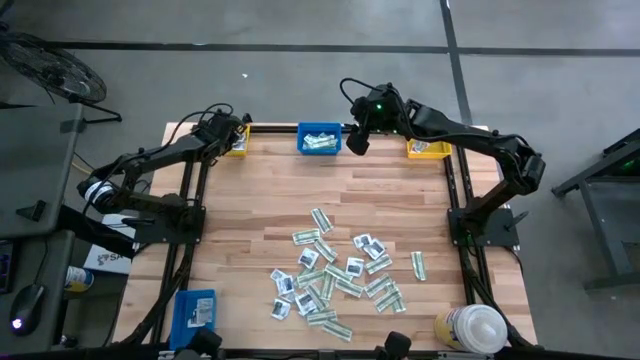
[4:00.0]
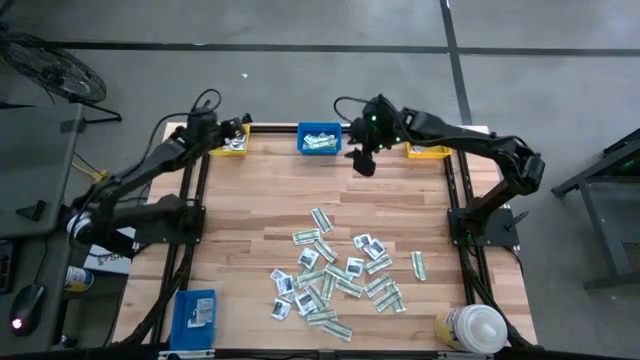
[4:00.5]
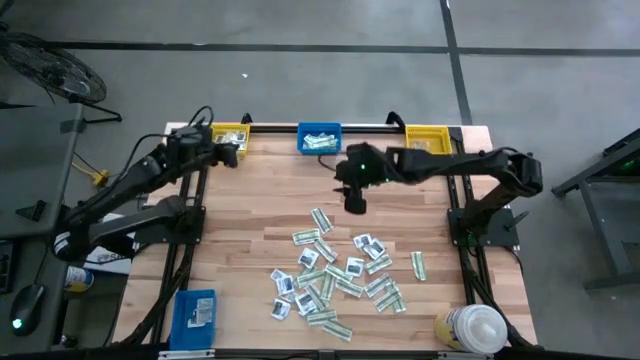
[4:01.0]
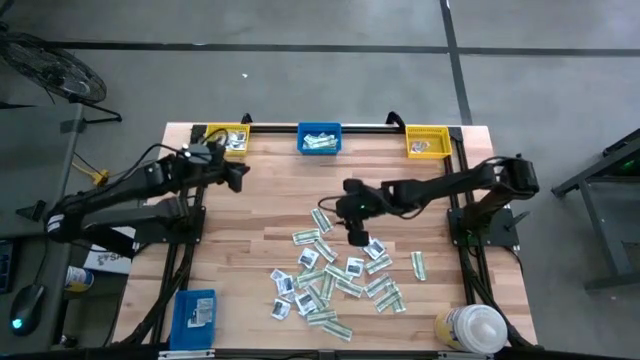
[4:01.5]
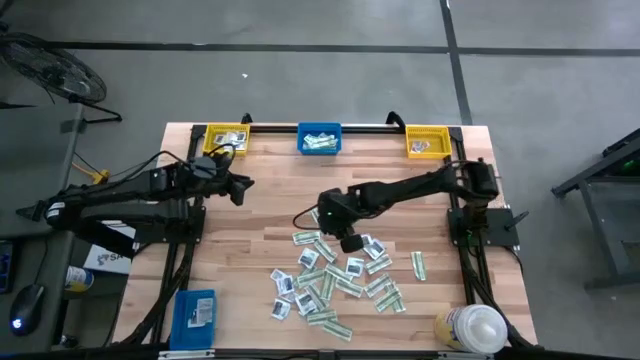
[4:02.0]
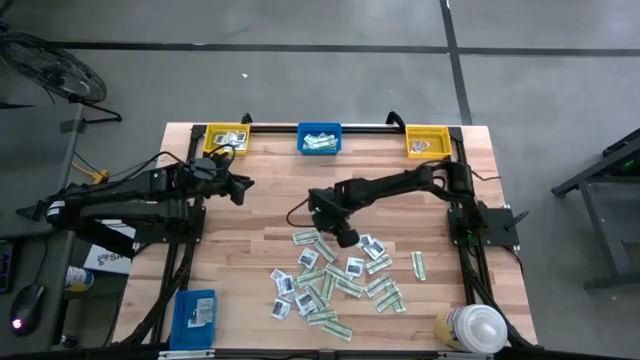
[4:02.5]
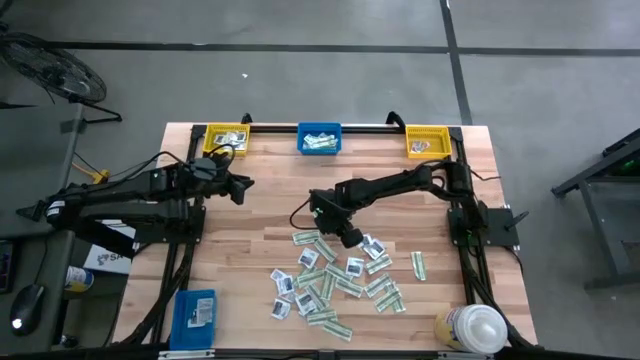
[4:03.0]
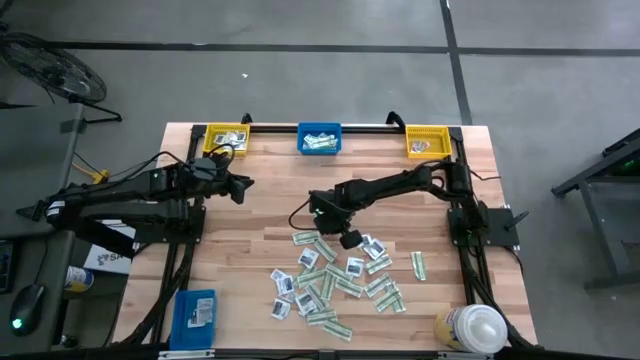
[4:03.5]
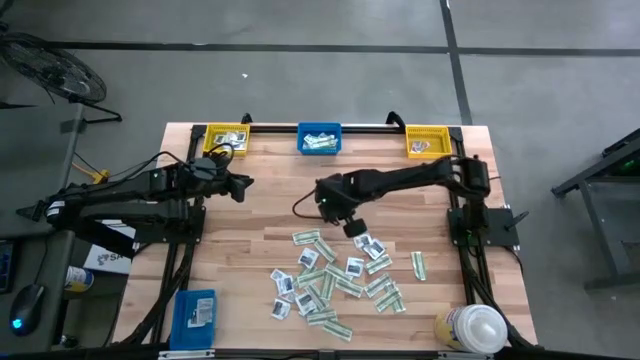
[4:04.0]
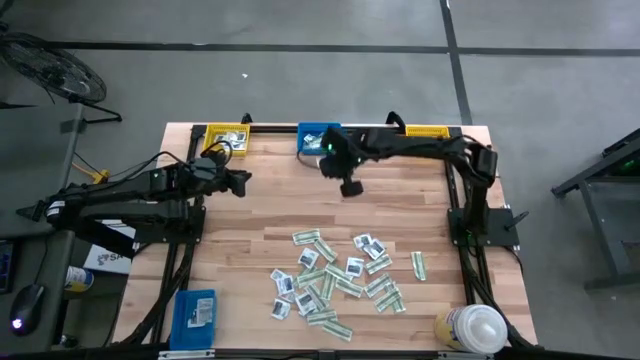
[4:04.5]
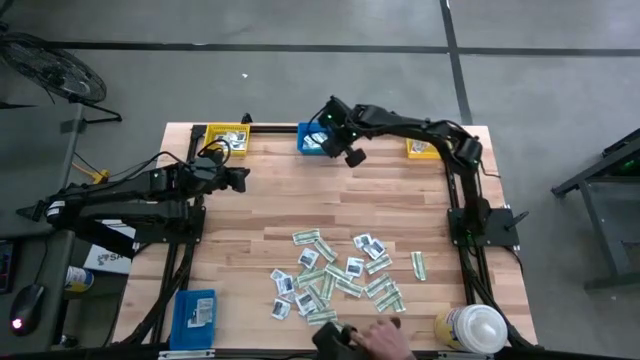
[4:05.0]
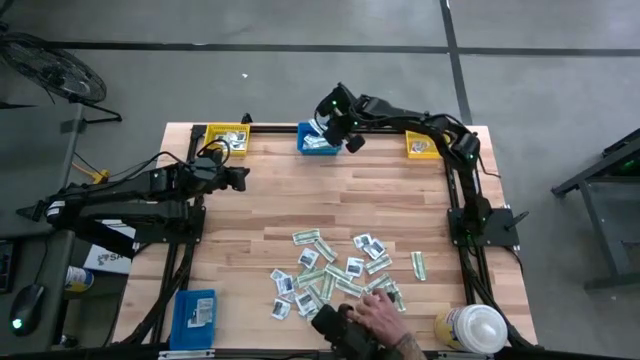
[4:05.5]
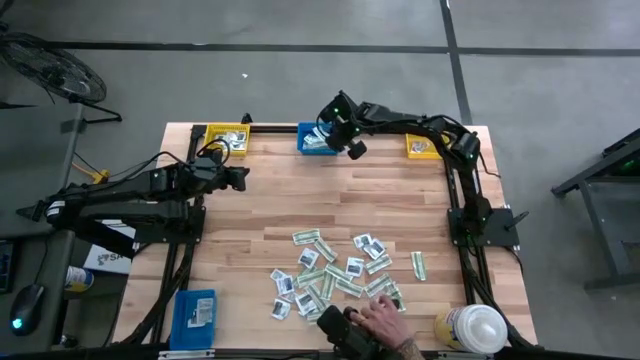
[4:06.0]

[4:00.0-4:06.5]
Task: Pick & Place First Aid Supplies
Put the green bandage pack into the top blue bin

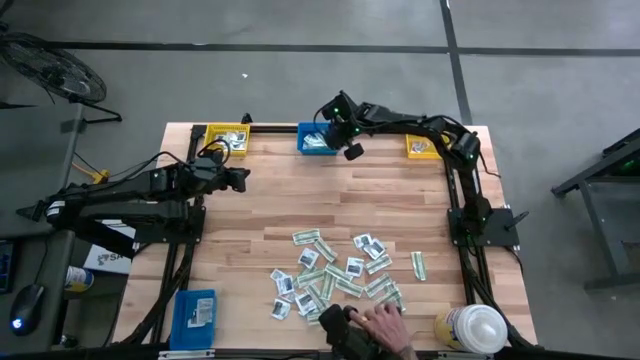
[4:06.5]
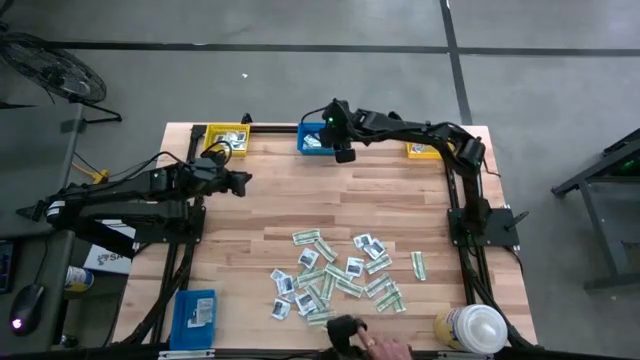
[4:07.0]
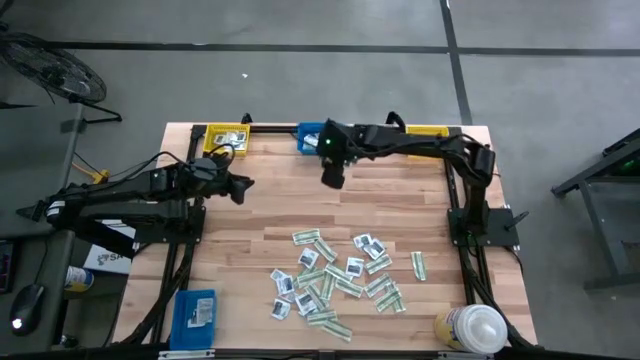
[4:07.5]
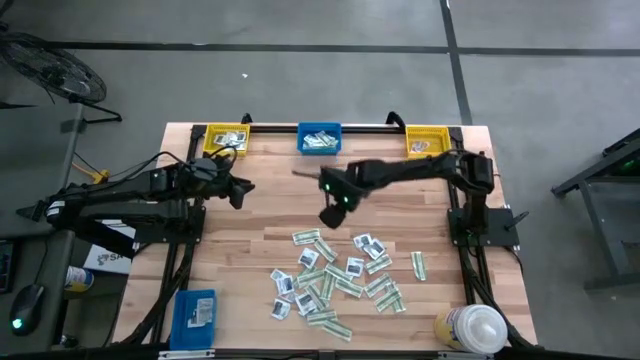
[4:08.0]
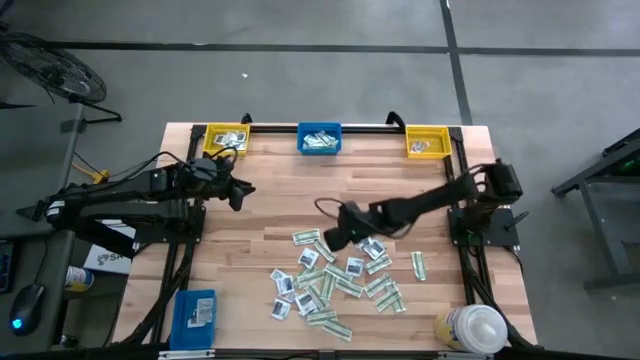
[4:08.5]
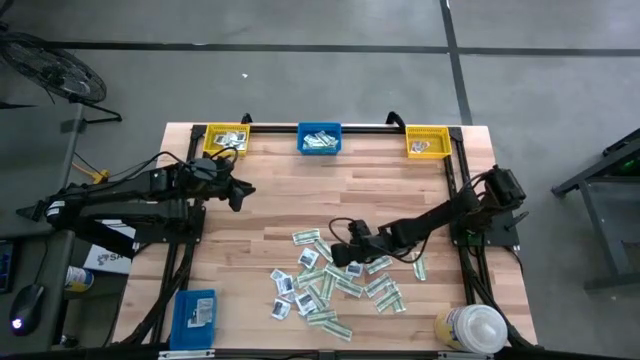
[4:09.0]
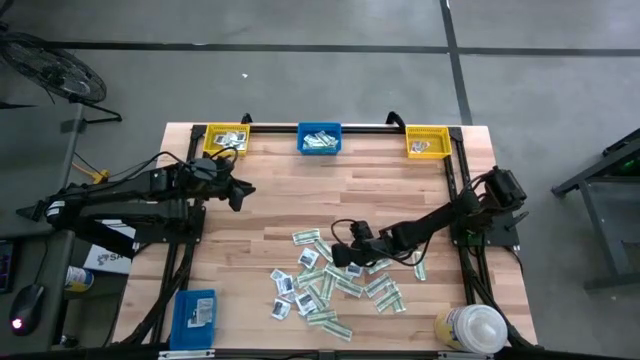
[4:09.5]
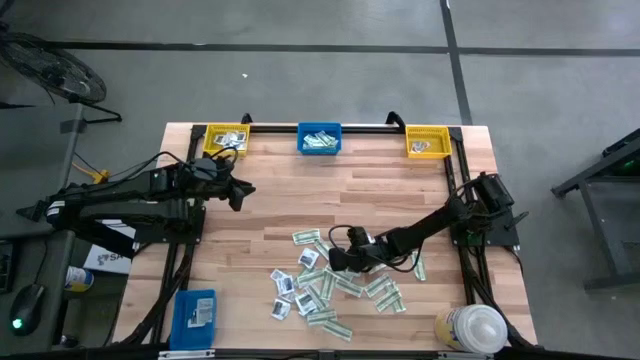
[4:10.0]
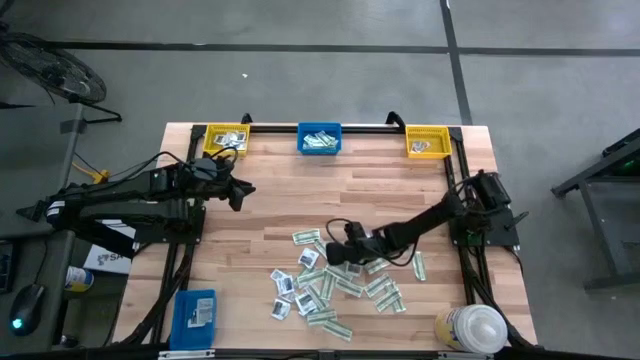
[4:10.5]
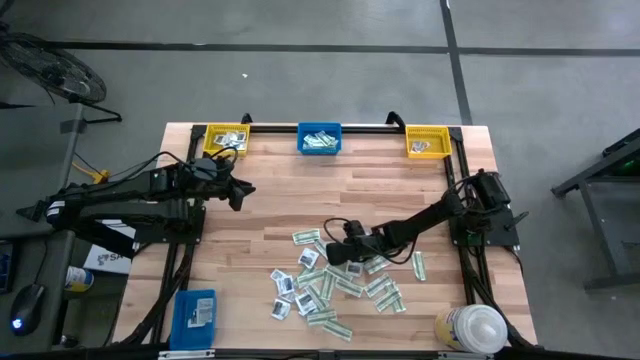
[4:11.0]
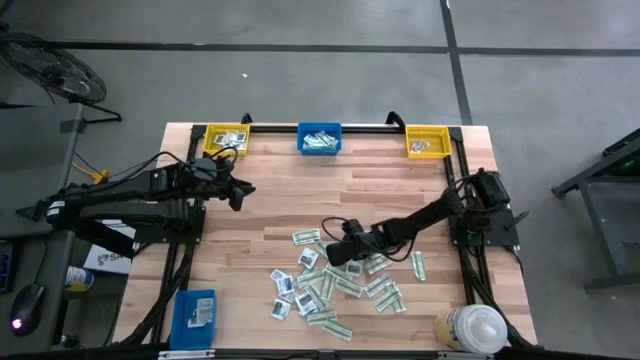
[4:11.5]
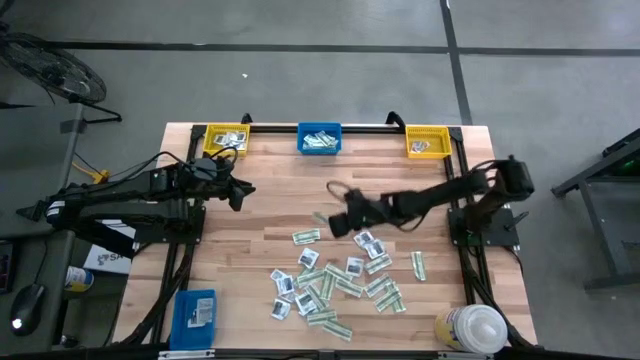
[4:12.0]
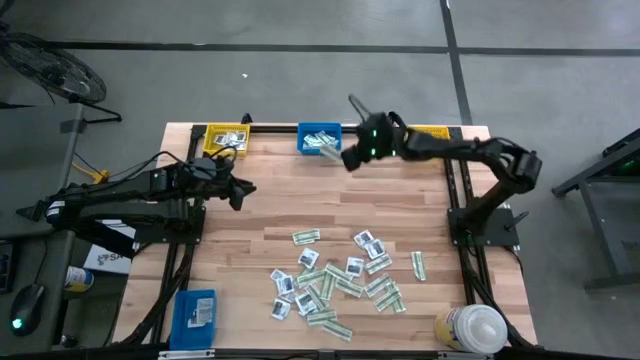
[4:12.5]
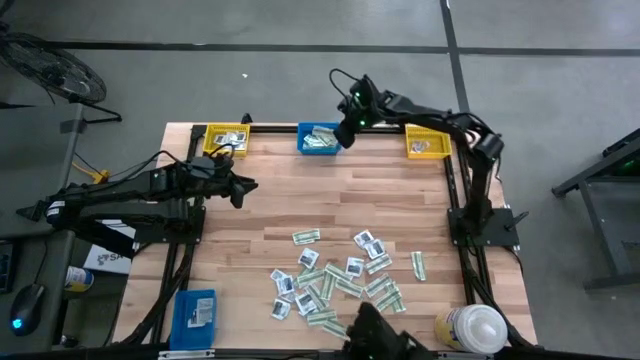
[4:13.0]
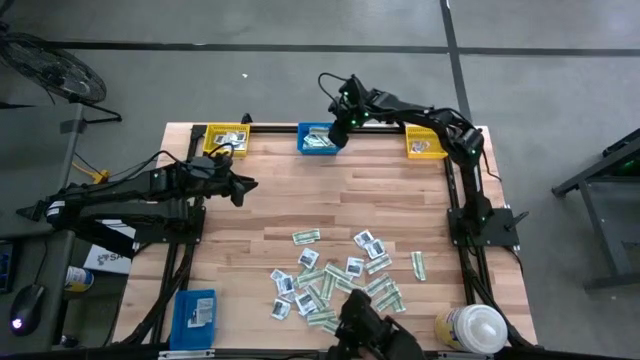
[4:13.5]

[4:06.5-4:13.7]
Put the green bandage pack into the top blue bin

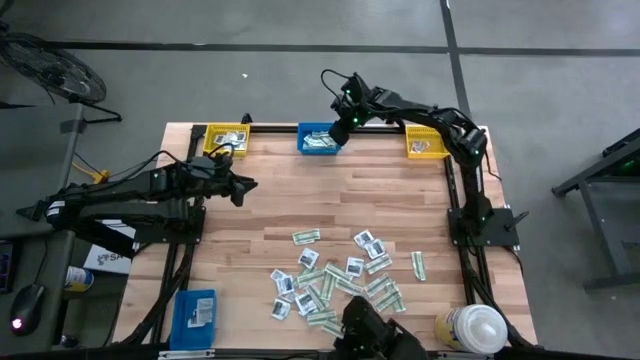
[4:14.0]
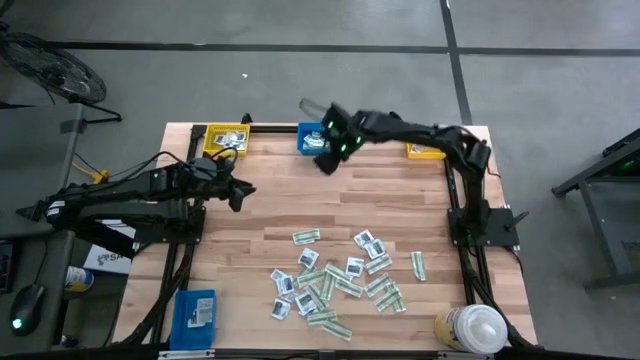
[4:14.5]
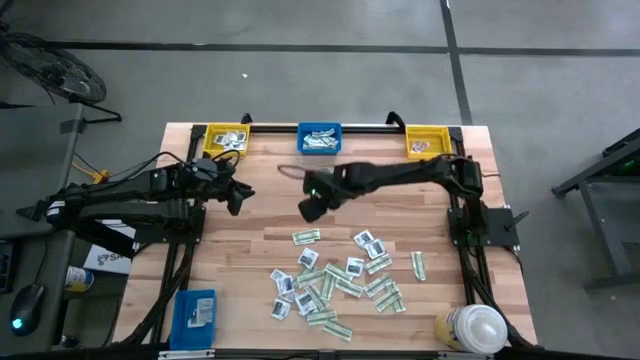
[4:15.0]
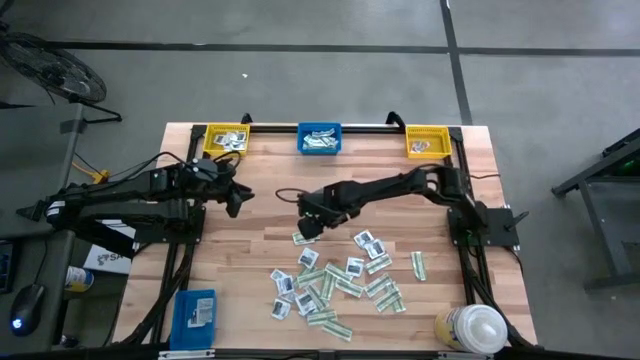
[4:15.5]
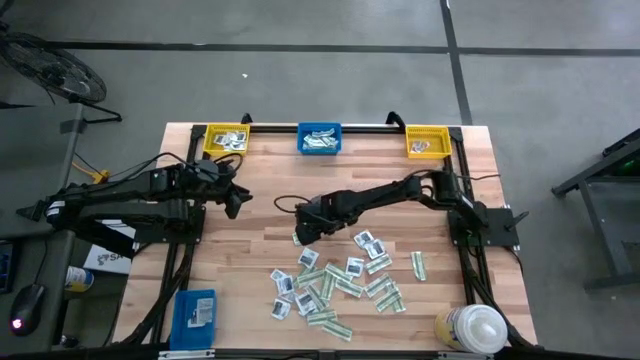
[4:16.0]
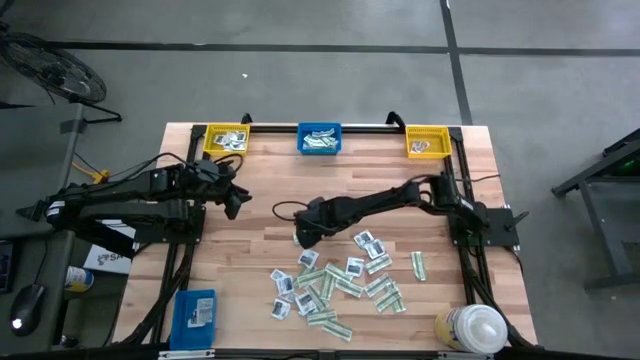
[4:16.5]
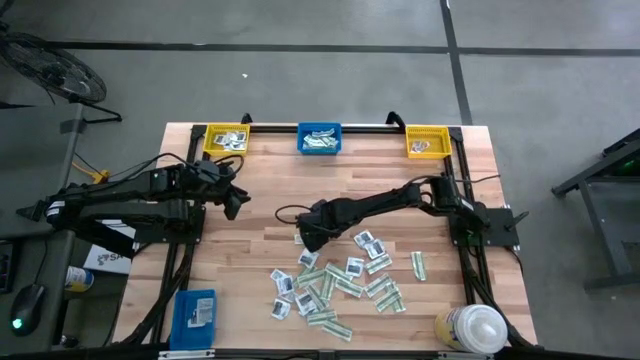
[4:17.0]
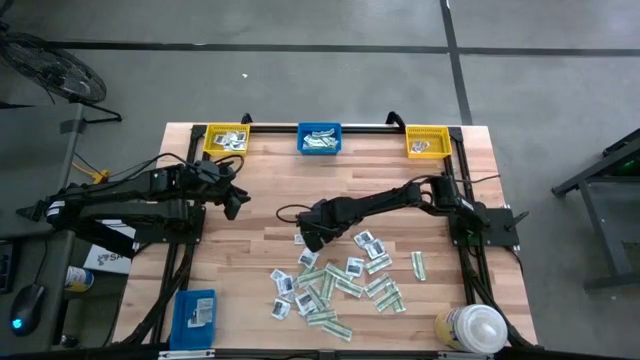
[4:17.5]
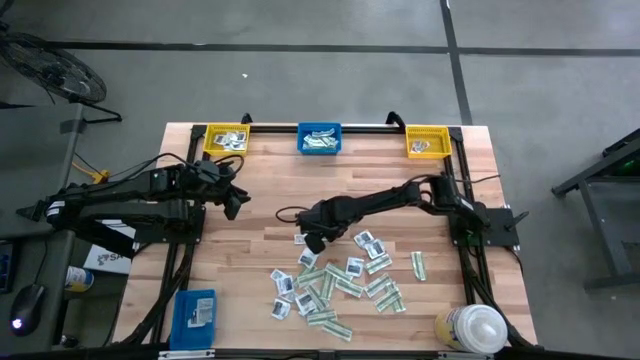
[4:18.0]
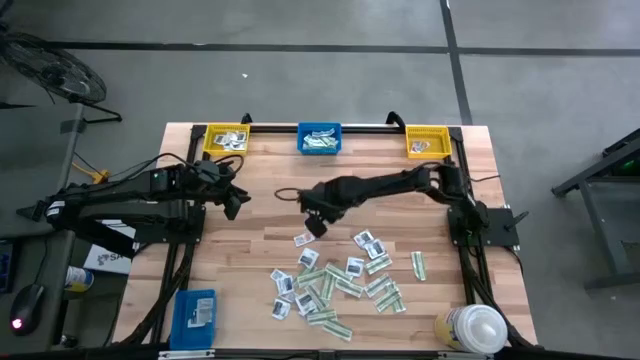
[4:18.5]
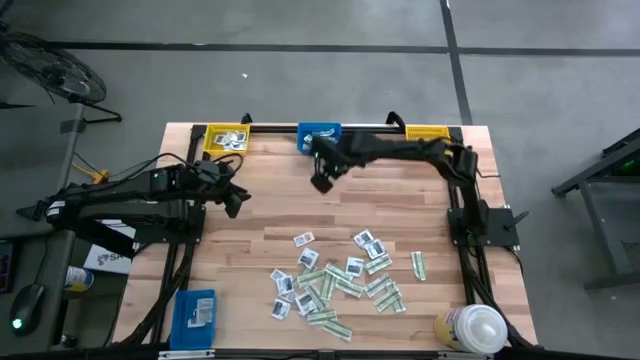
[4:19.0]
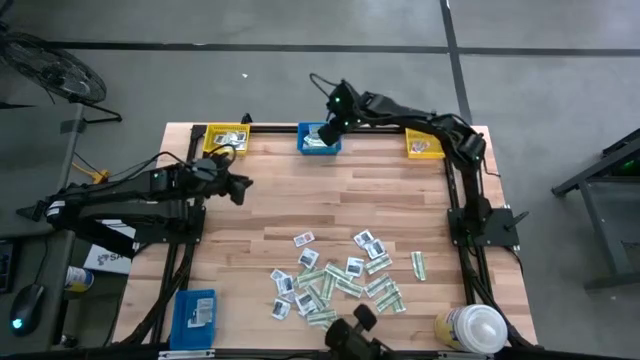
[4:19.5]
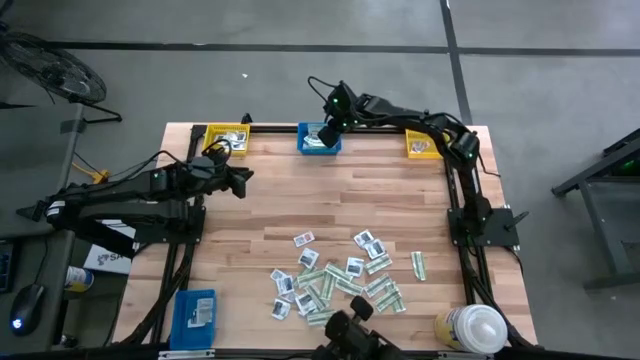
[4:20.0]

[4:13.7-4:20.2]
Put the green bandage pack into the top blue bin
